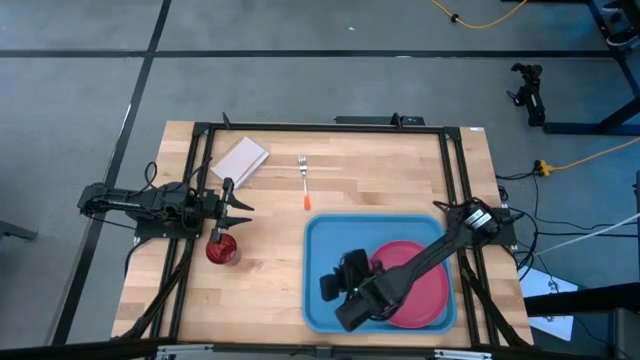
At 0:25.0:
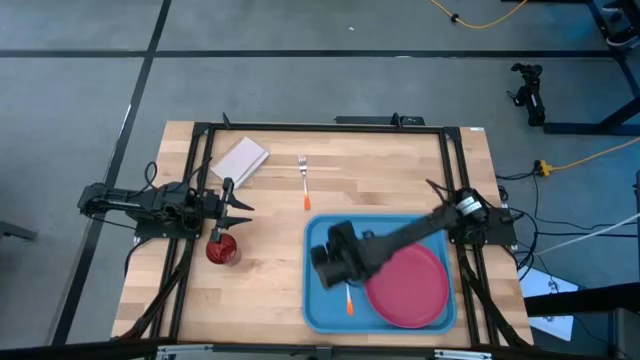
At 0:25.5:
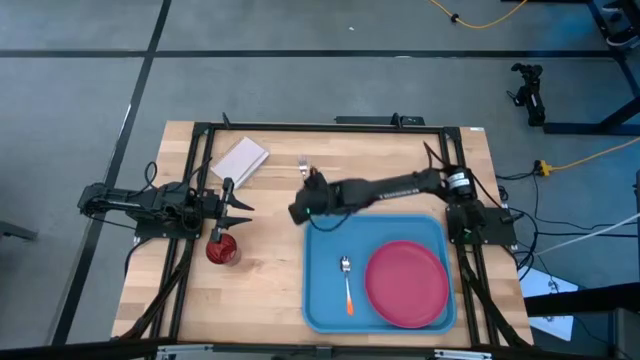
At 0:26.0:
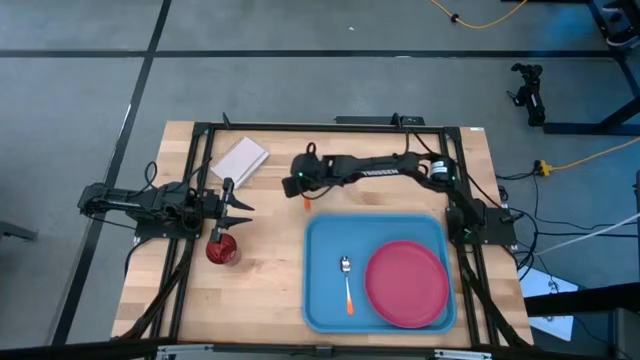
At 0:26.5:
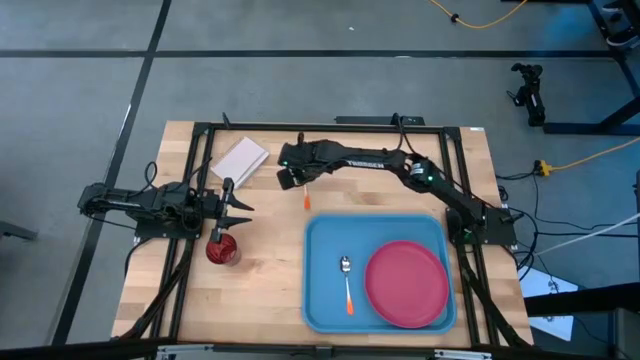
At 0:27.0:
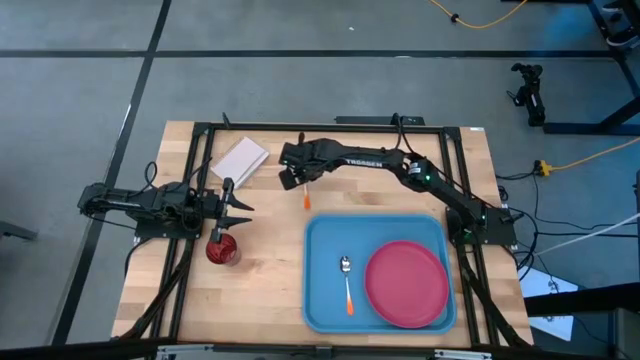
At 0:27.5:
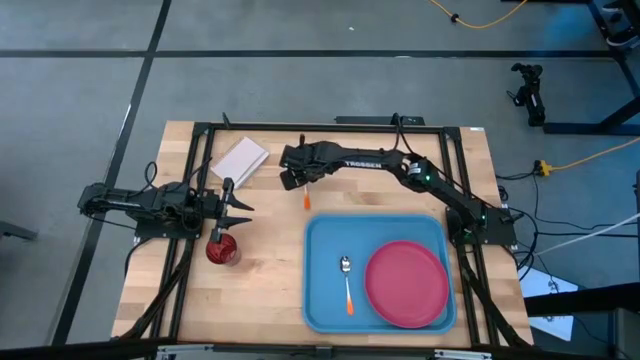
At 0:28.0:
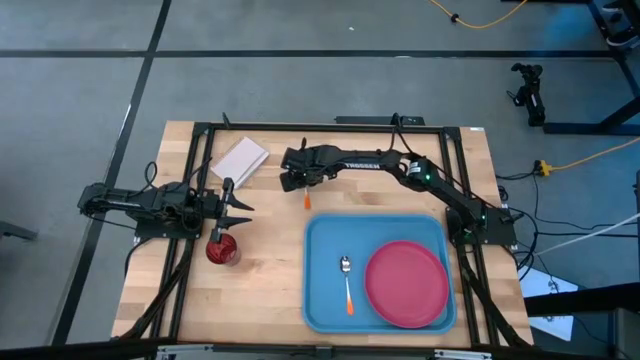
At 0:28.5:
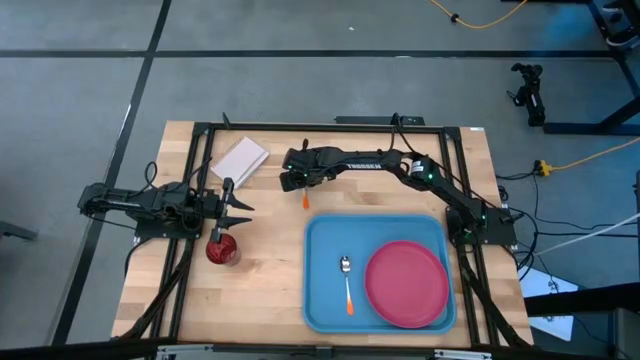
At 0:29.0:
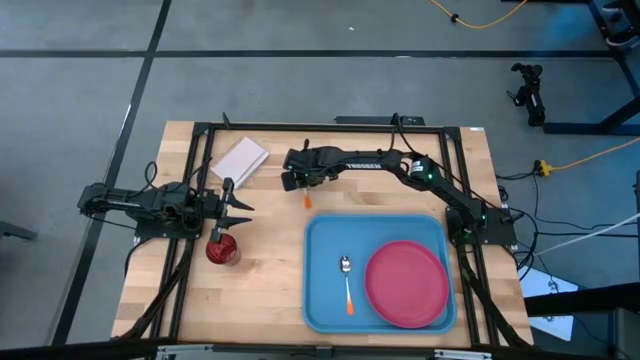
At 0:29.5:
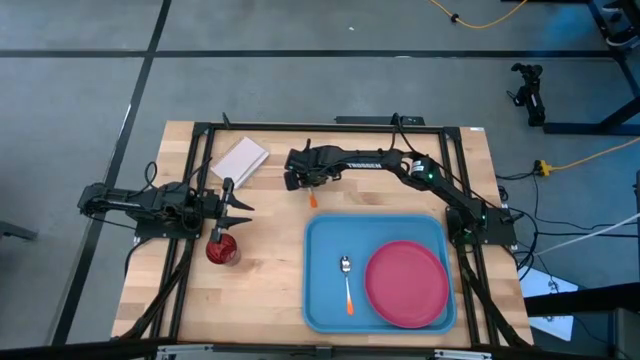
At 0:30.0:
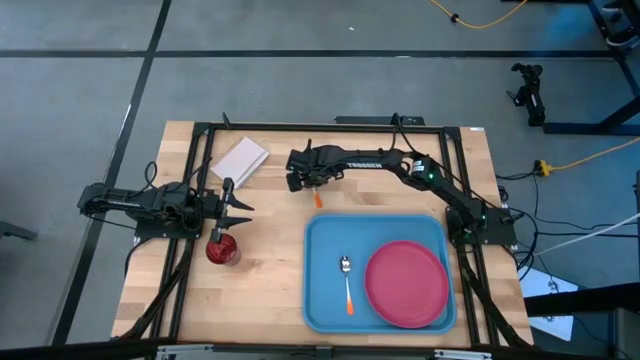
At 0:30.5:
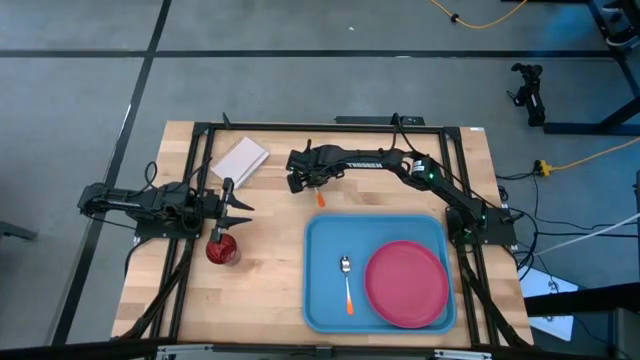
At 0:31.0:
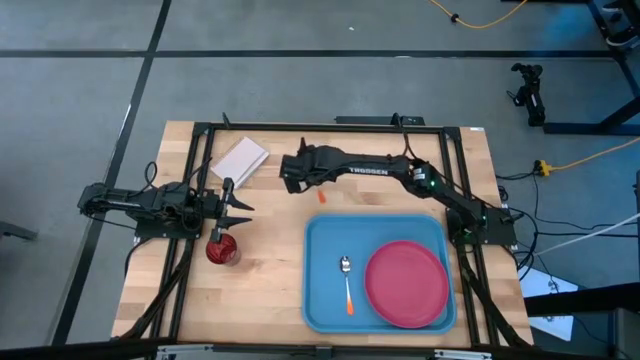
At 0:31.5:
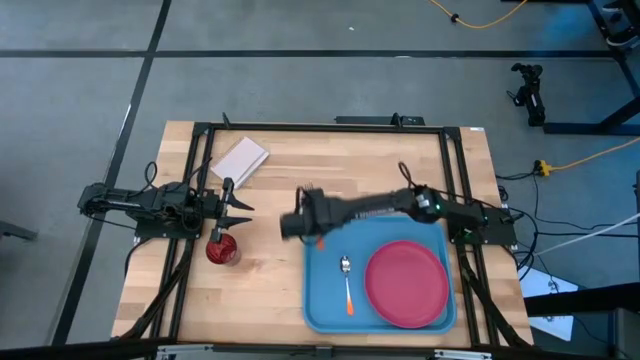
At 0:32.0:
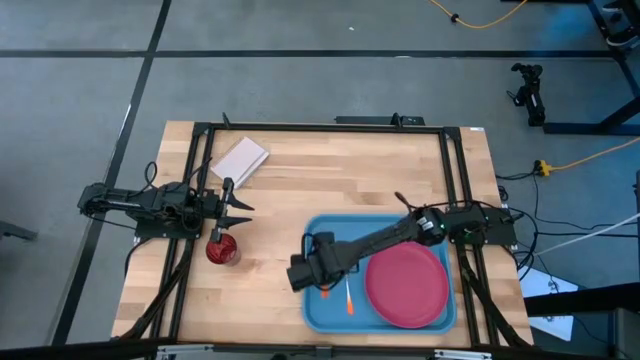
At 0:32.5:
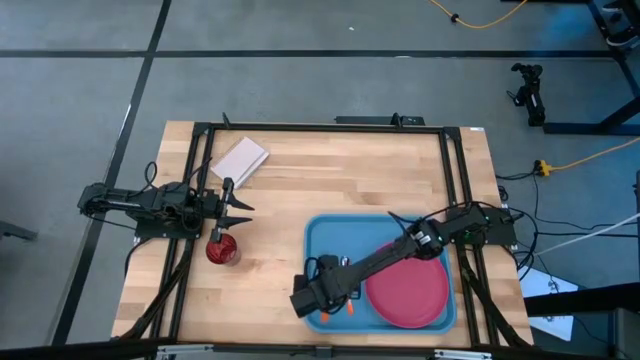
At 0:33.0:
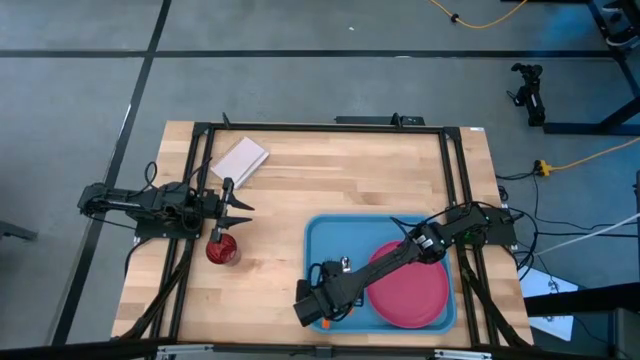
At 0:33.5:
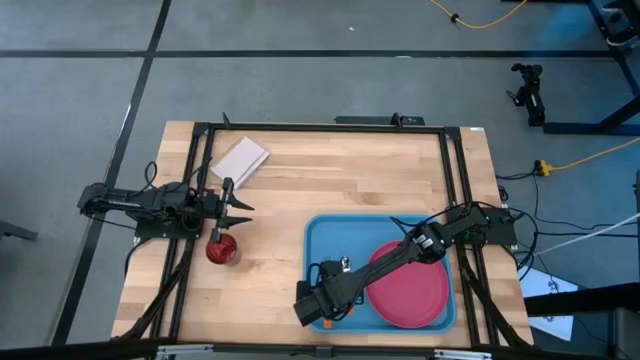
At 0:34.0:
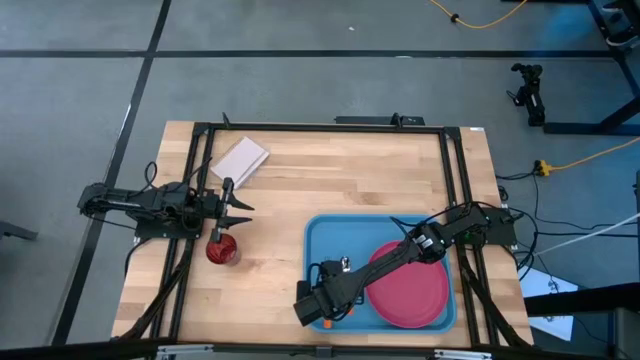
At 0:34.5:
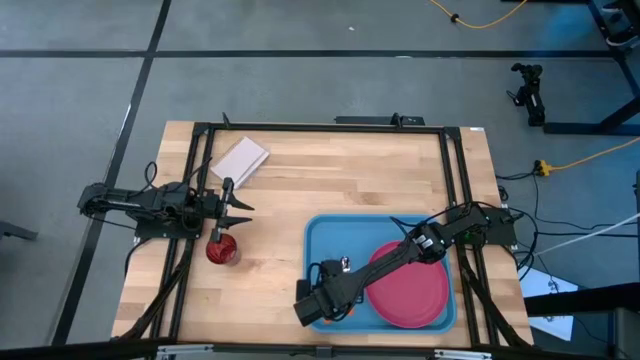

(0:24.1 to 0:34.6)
Task: Pick and place plate/cup/fork/spoon on tray
Put the orange fork on the blue tray

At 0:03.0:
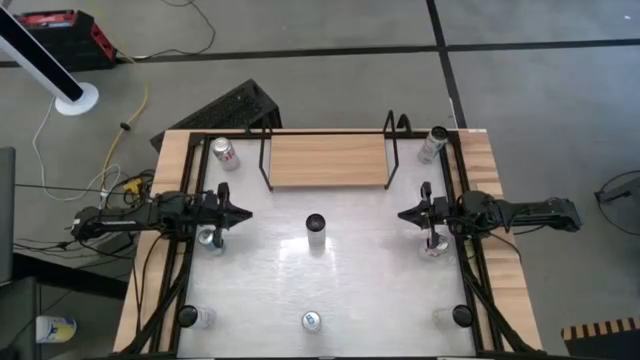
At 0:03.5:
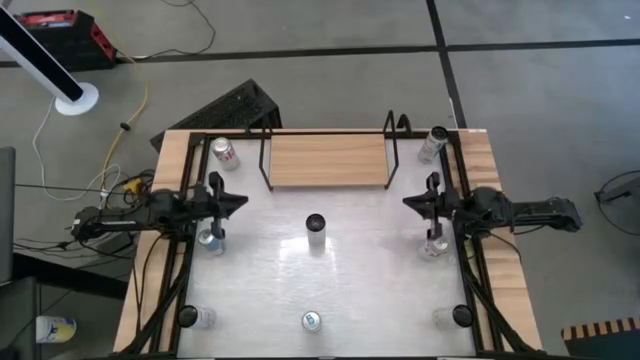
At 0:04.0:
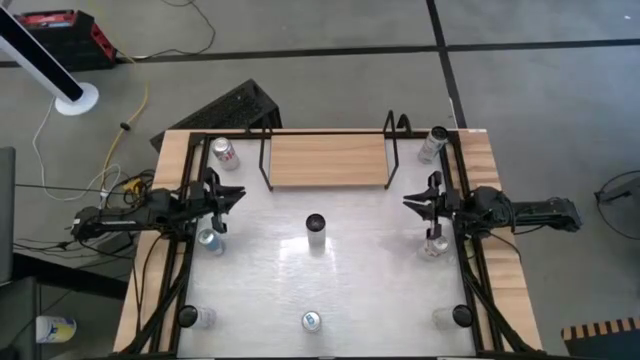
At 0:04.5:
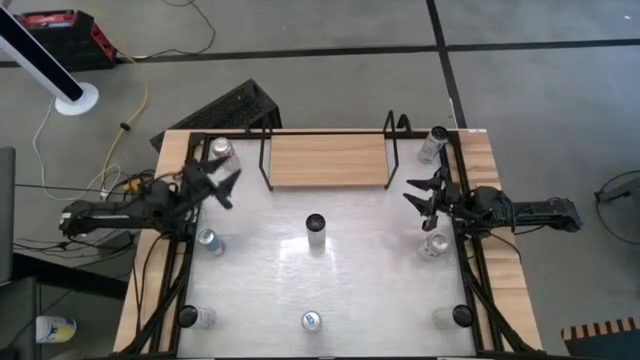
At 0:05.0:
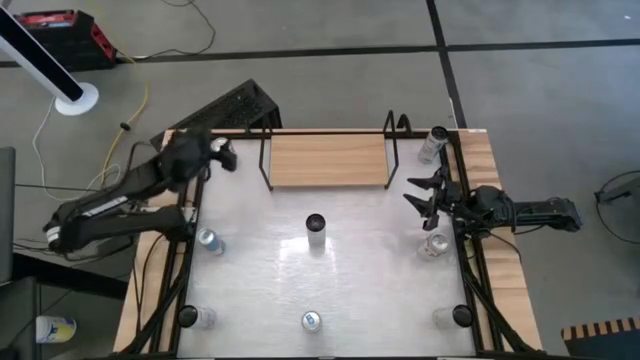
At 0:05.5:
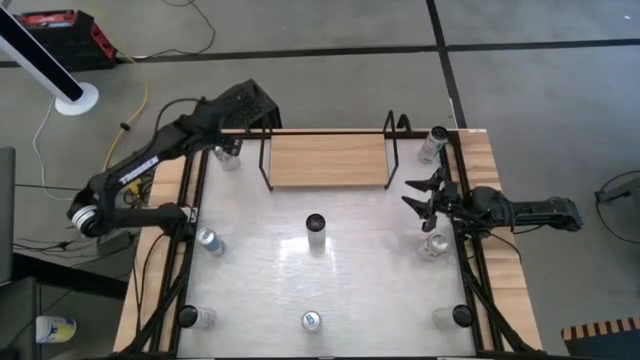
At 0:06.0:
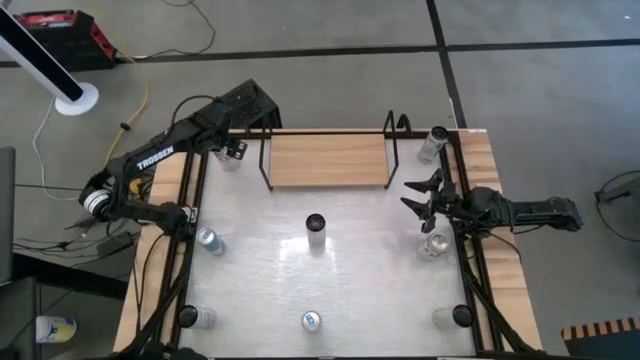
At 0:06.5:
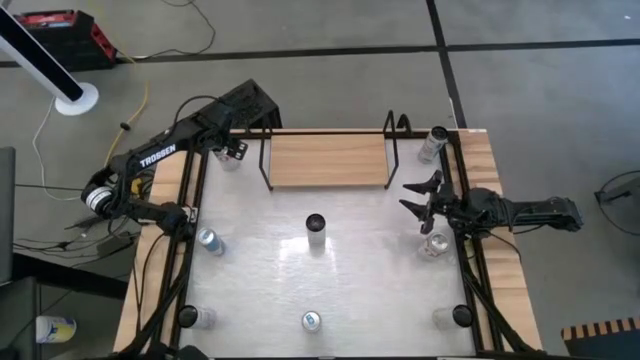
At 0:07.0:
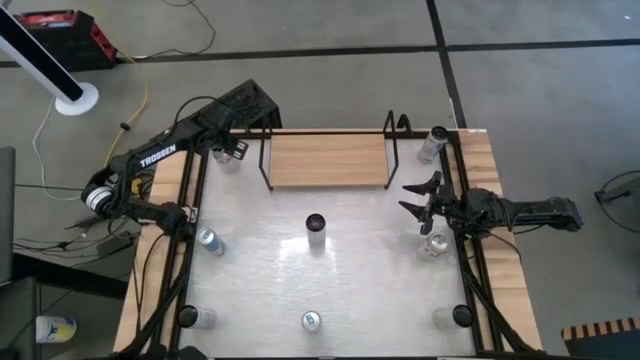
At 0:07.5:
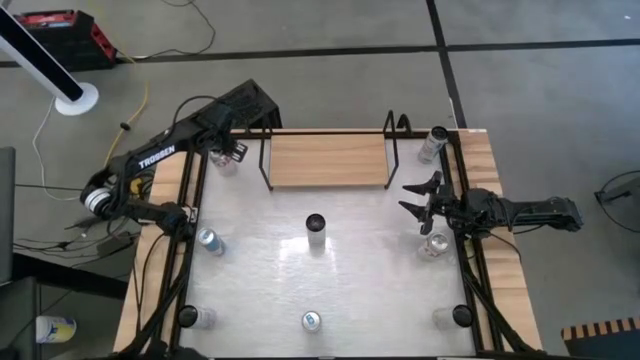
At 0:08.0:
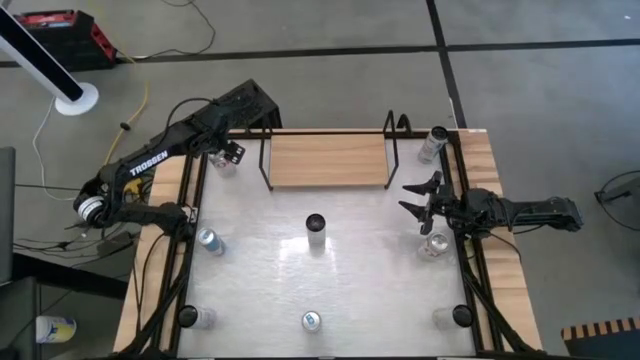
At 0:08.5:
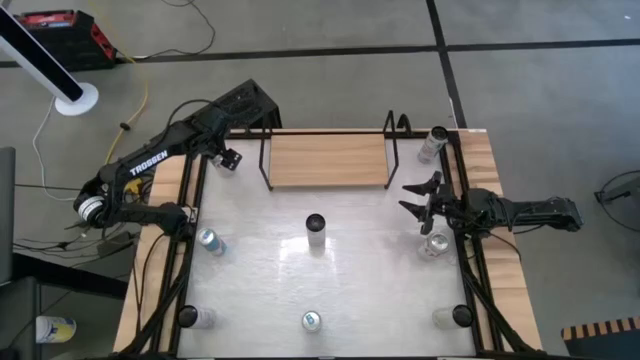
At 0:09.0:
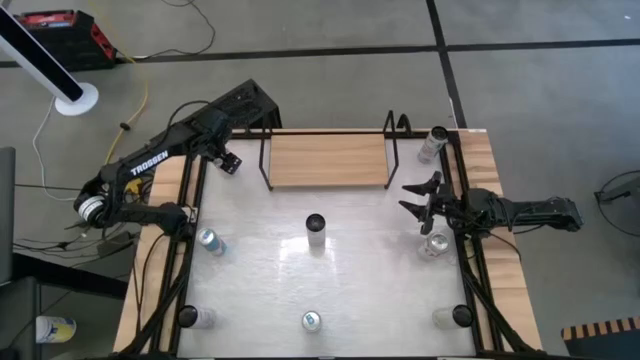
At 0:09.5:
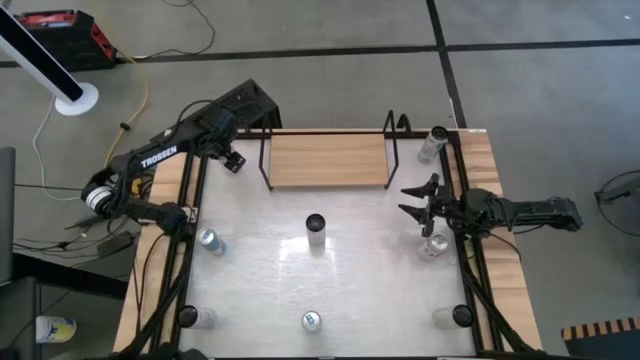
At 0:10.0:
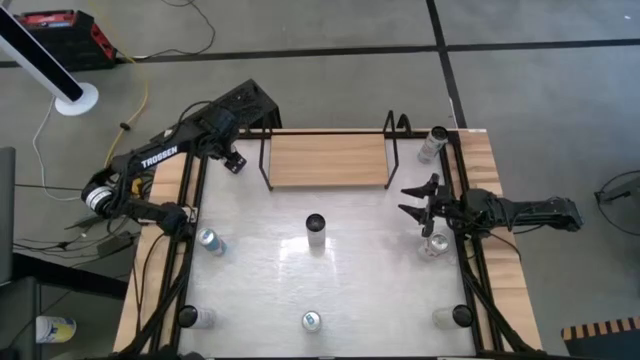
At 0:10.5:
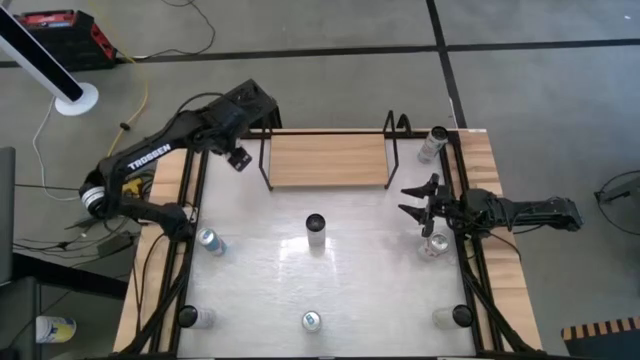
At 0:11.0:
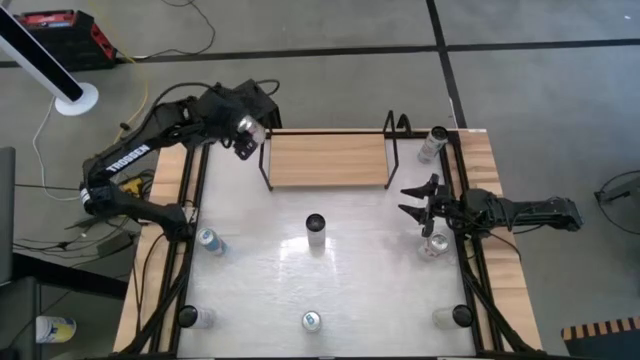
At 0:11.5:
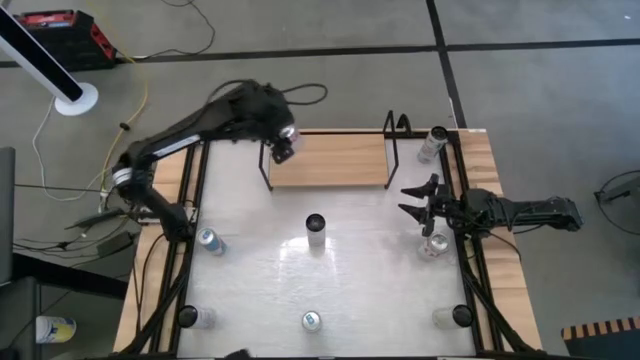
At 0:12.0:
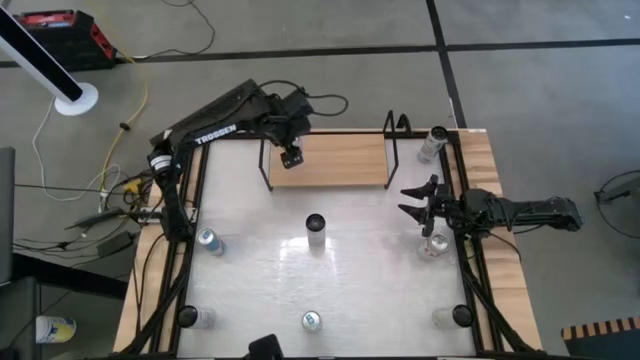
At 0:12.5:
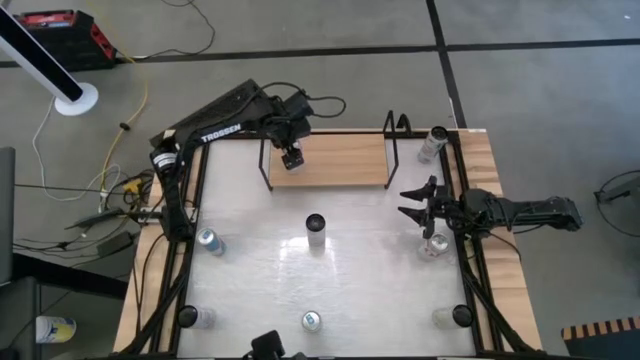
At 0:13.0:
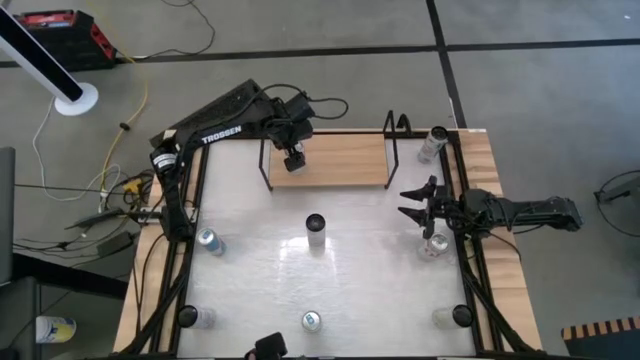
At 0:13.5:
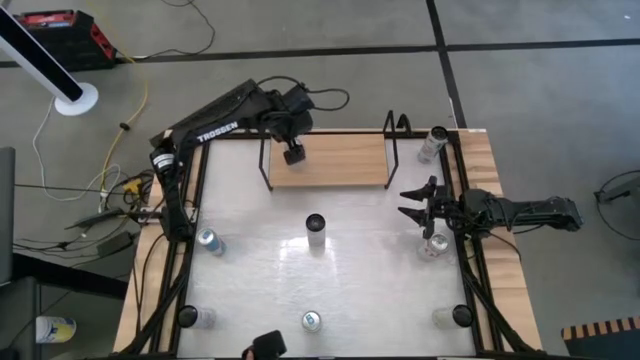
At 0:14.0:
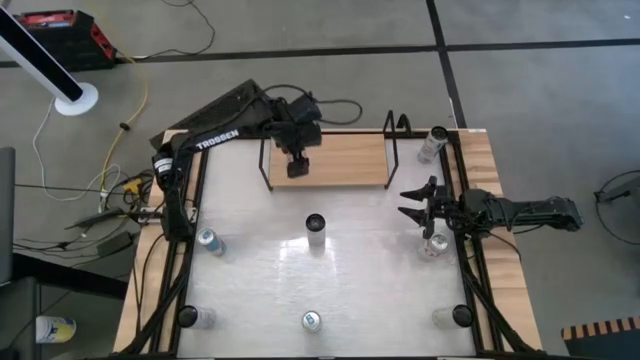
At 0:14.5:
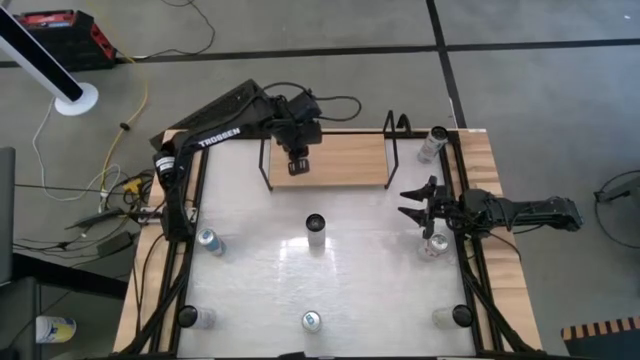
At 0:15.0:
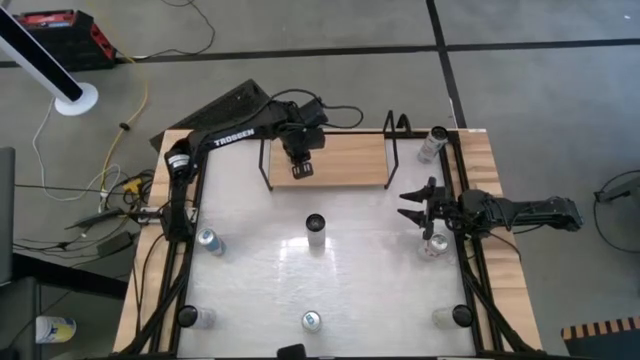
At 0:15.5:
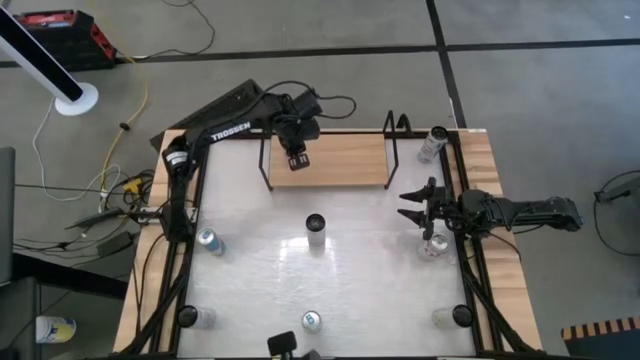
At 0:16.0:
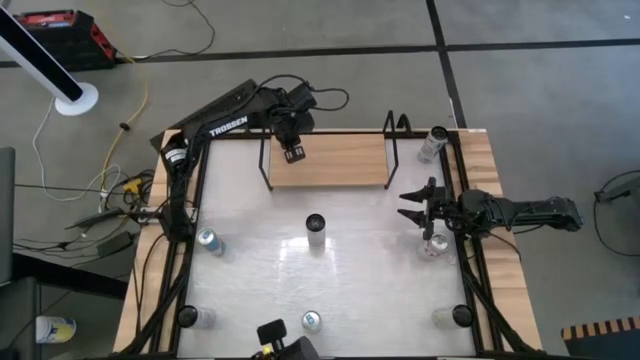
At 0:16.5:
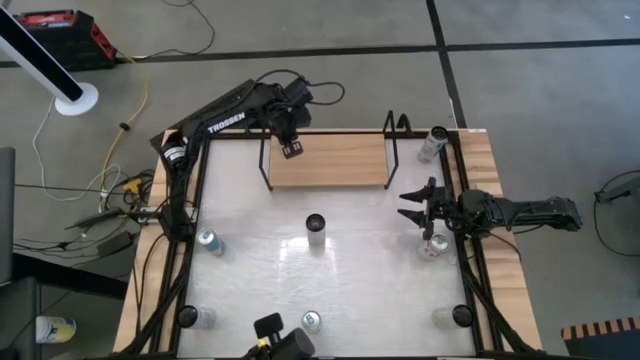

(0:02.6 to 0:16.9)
Task: Place canned beverage on shelf
Put the top right red-silver soda can on the shelf
